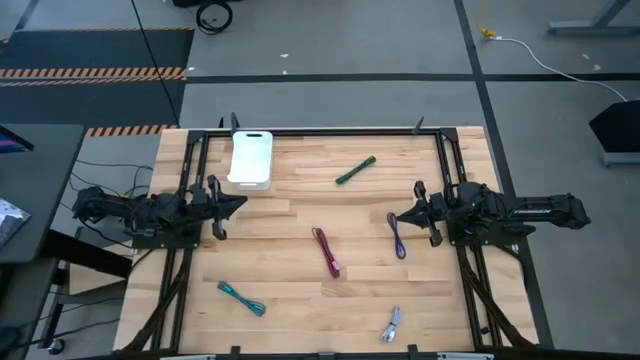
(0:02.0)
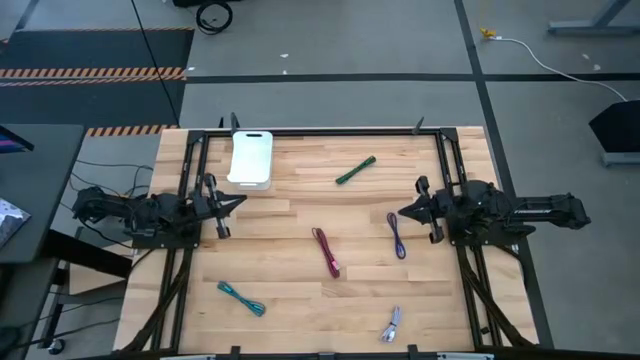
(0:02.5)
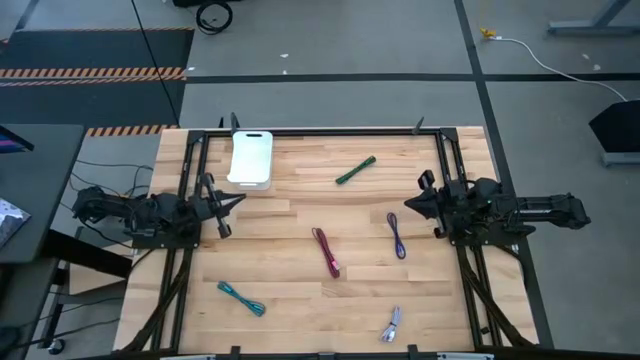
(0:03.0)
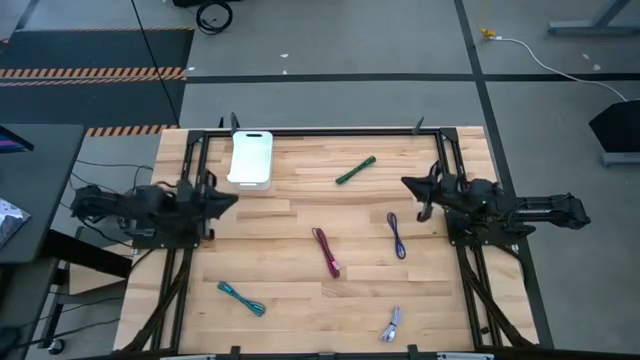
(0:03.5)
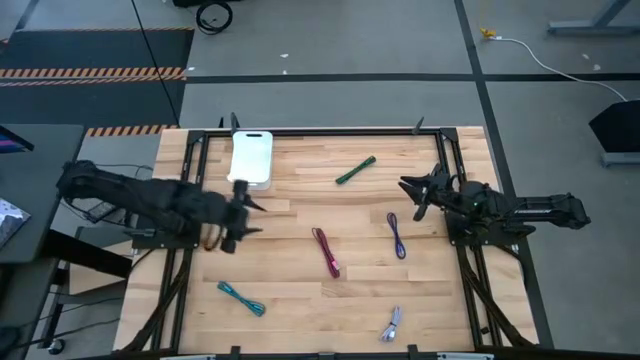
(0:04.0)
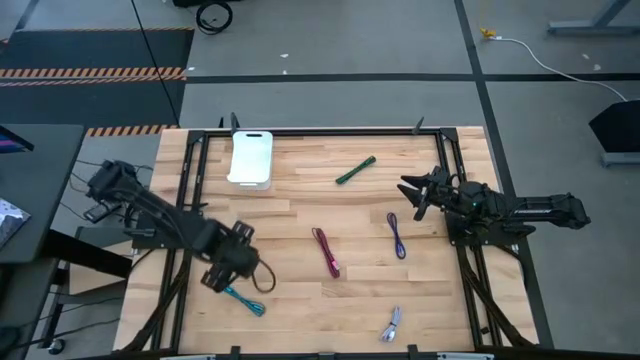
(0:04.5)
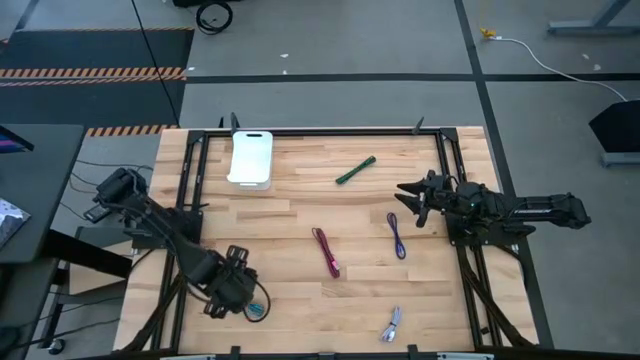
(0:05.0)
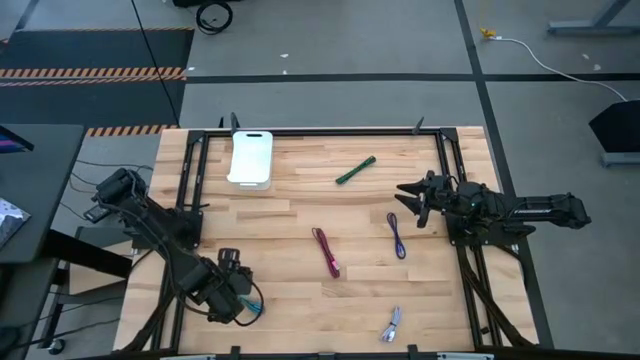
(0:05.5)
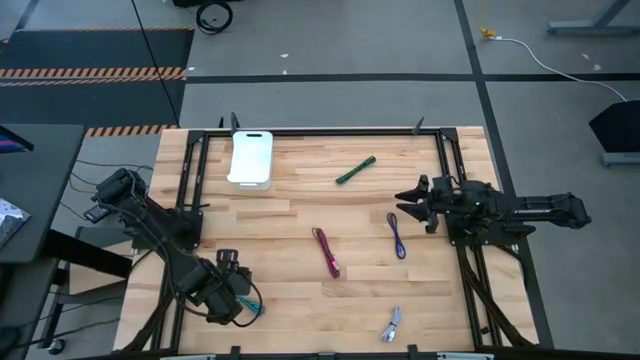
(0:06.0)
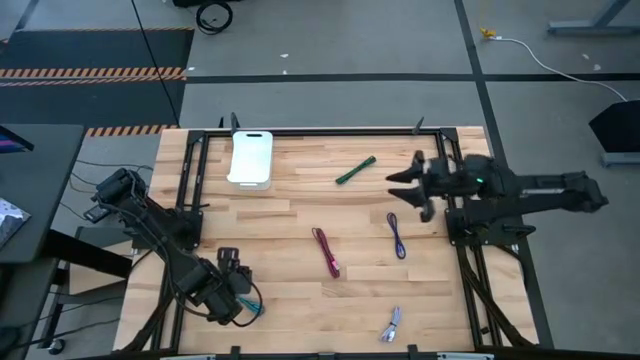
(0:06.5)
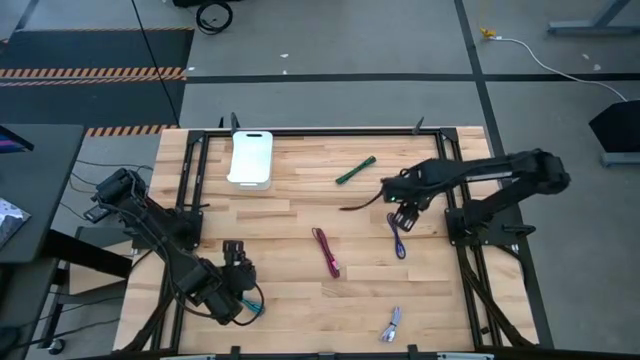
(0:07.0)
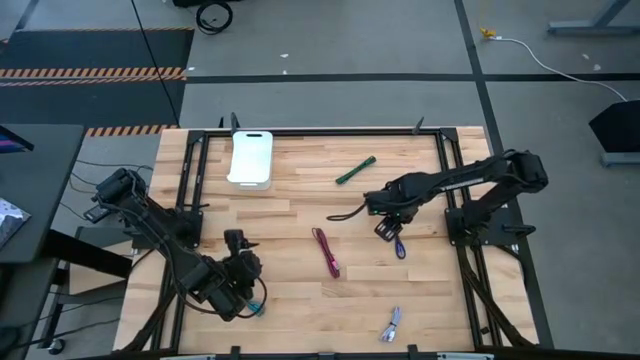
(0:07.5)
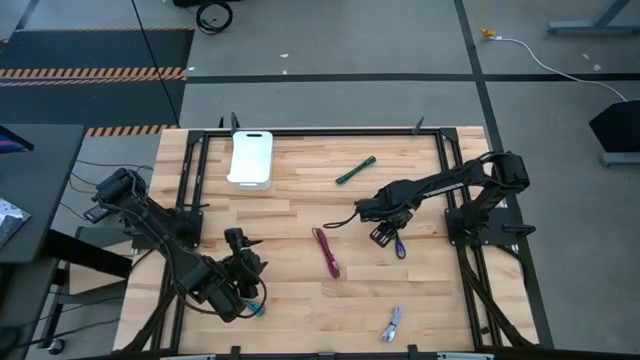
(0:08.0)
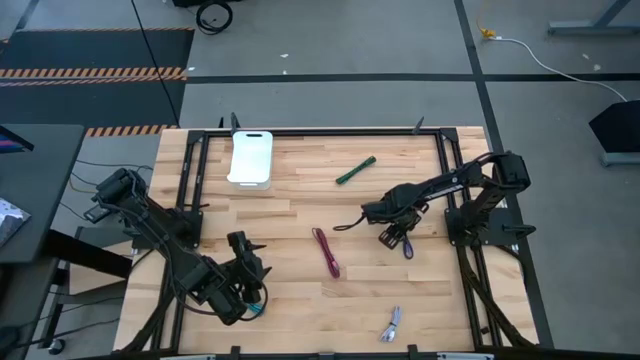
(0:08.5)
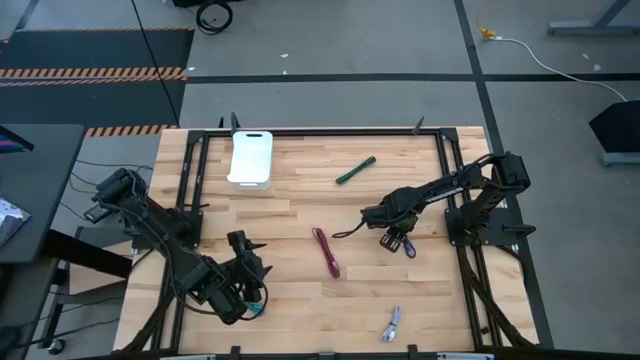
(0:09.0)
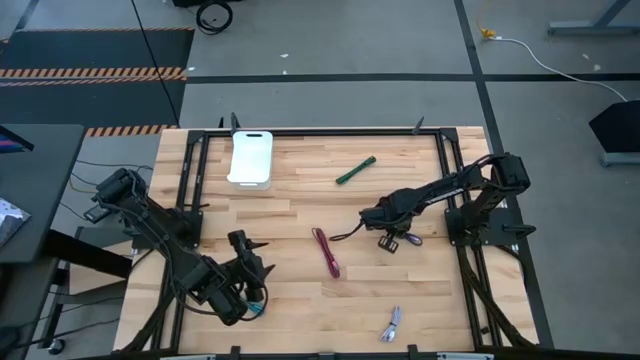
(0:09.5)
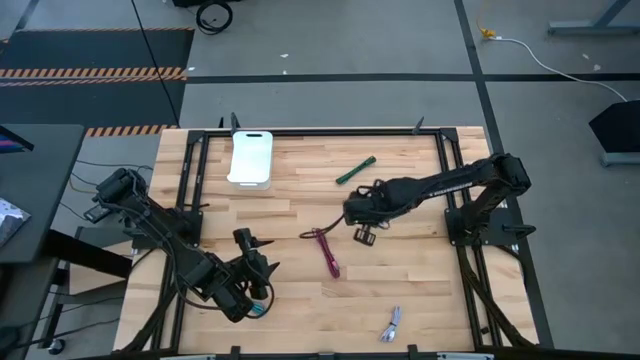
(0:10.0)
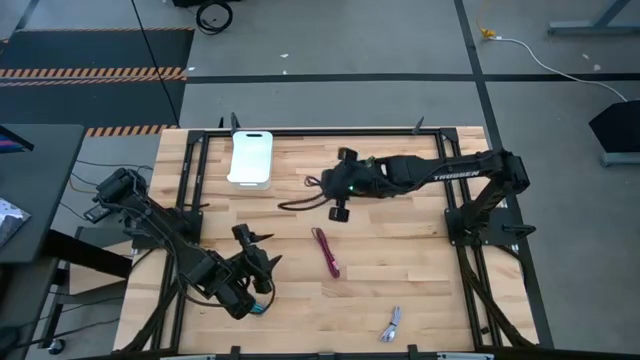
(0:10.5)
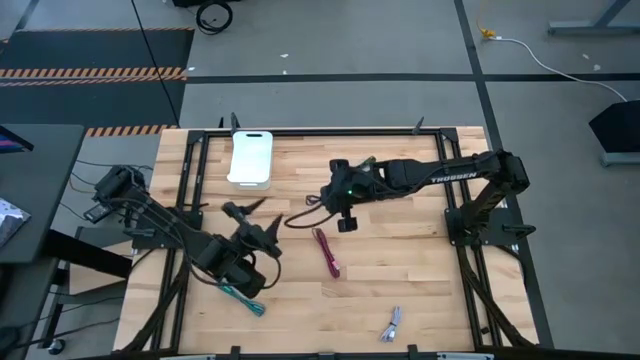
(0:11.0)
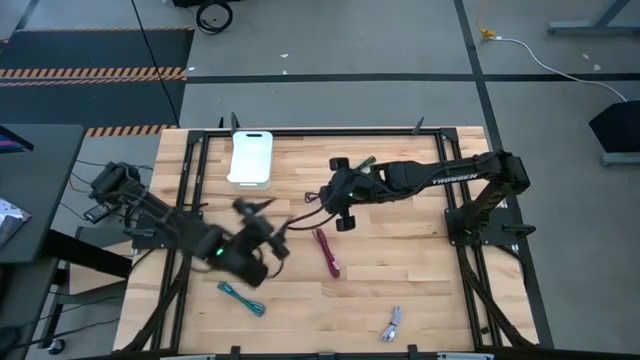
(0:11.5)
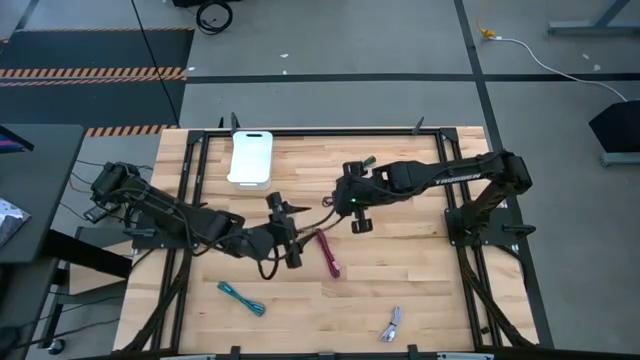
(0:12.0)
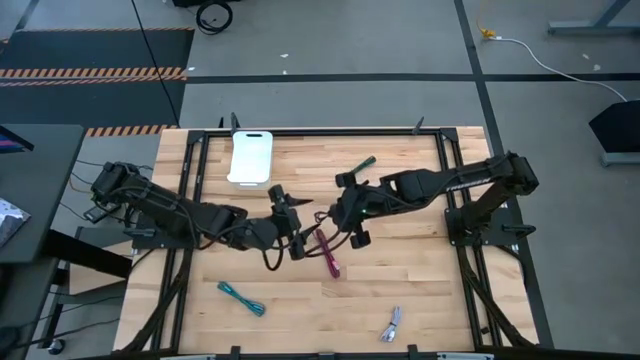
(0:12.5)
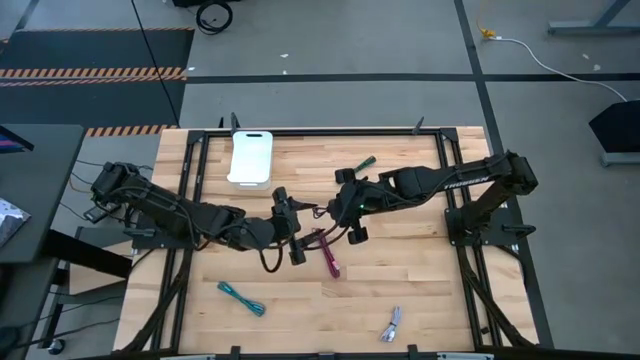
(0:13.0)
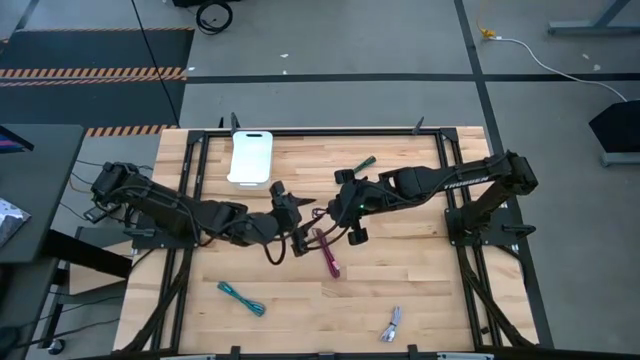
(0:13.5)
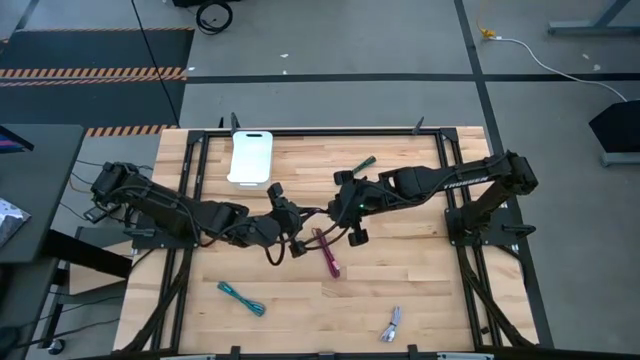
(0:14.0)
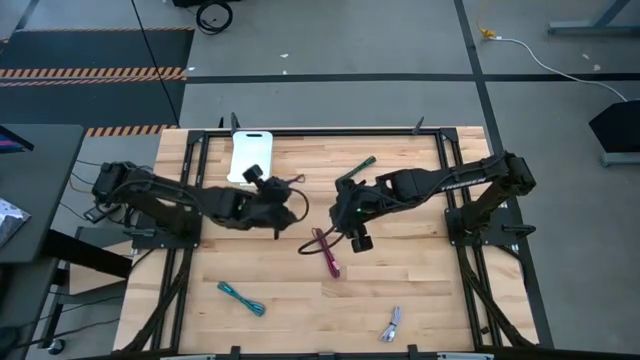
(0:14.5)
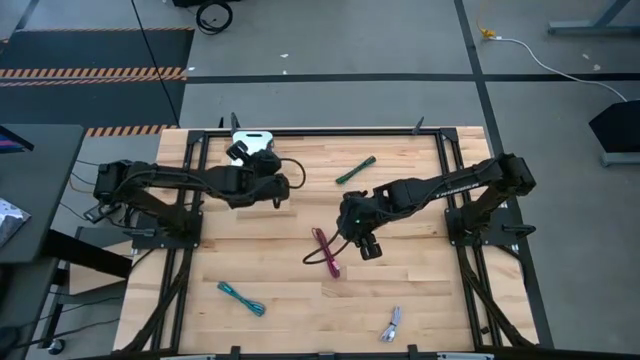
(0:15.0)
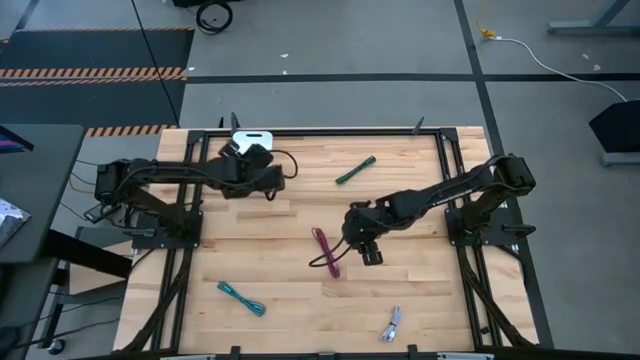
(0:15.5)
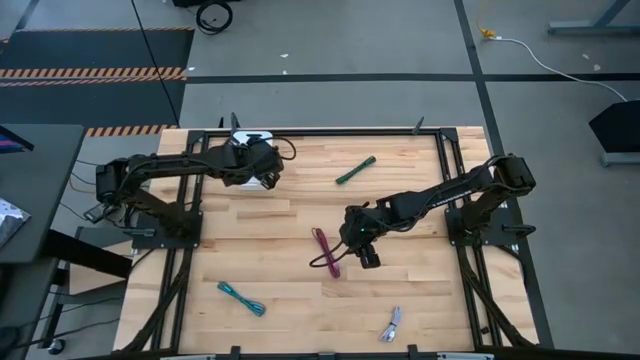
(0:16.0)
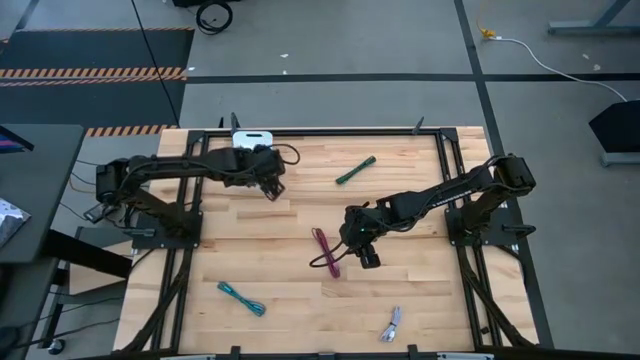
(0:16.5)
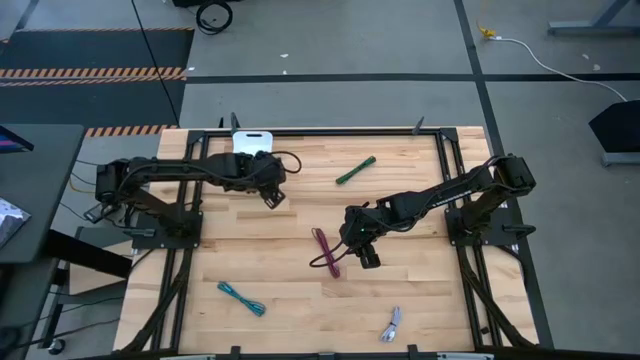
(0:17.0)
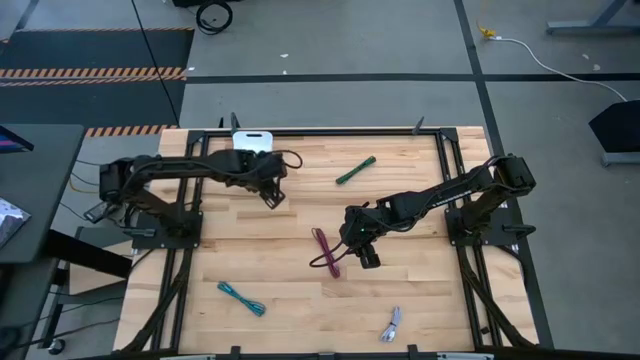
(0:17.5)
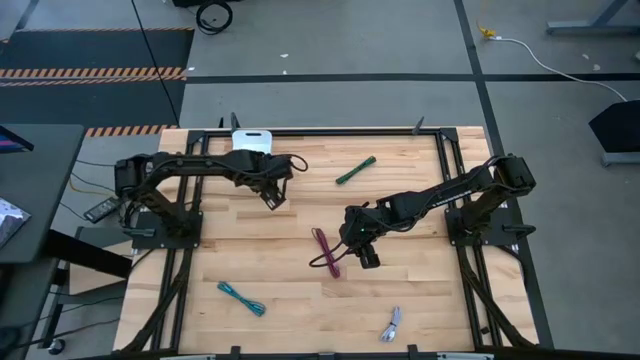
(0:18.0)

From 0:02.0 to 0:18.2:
Task: Pick and place USB-C Cables
Put the purple charger cable into the white bin
